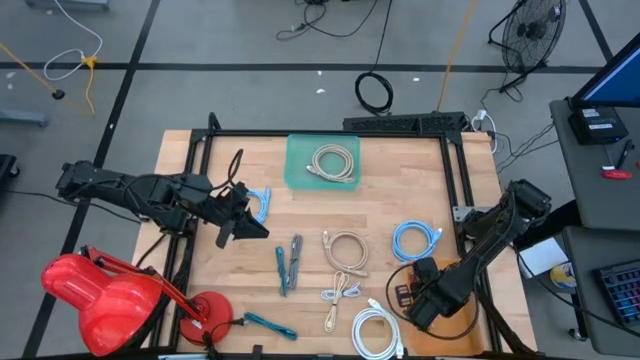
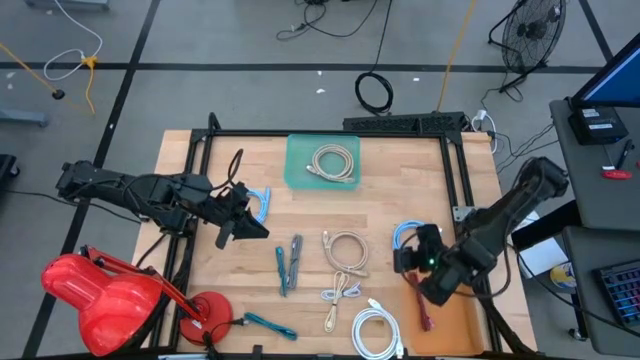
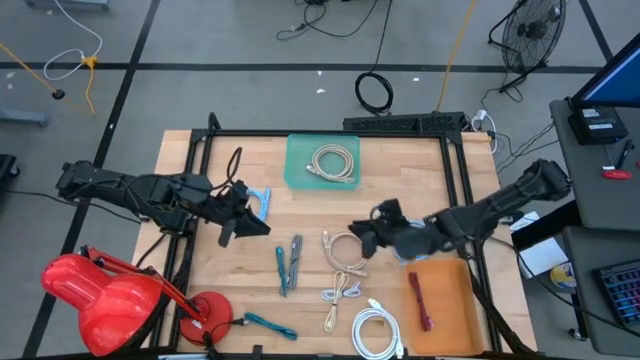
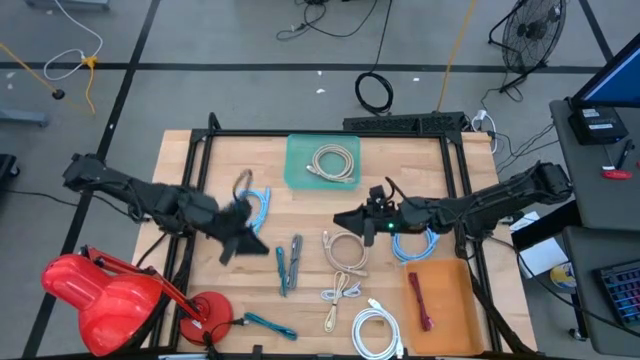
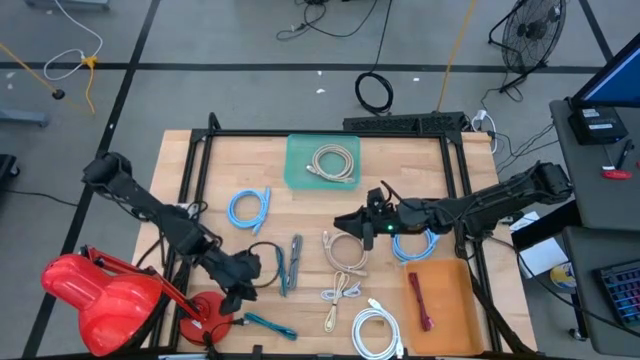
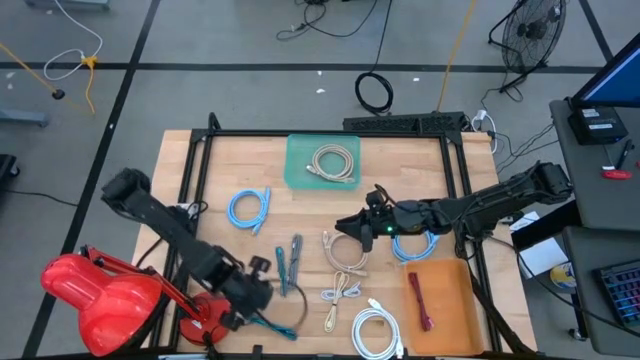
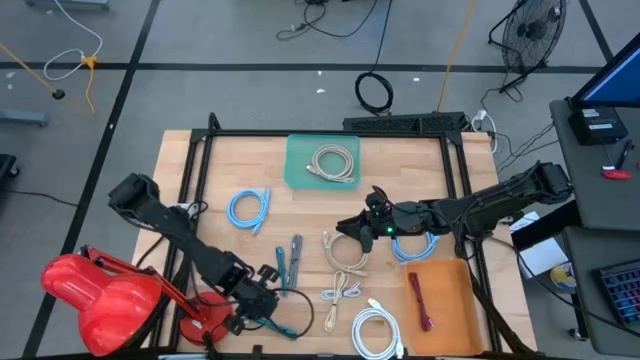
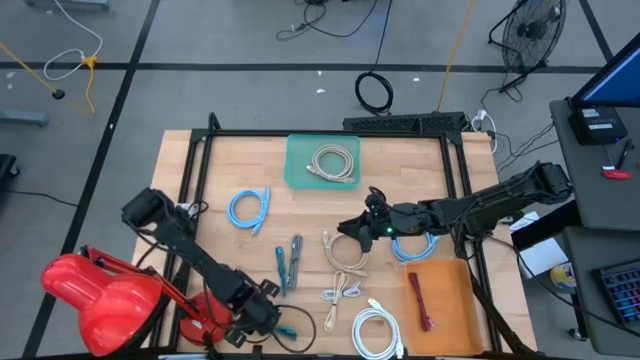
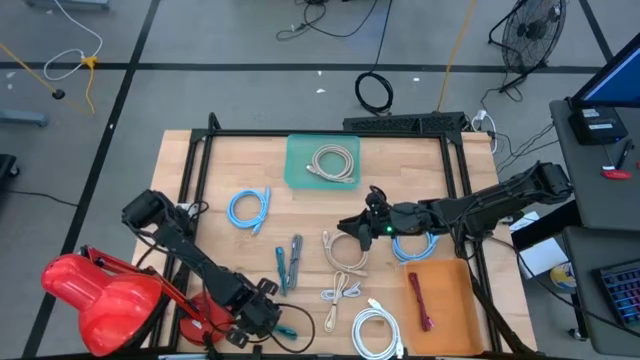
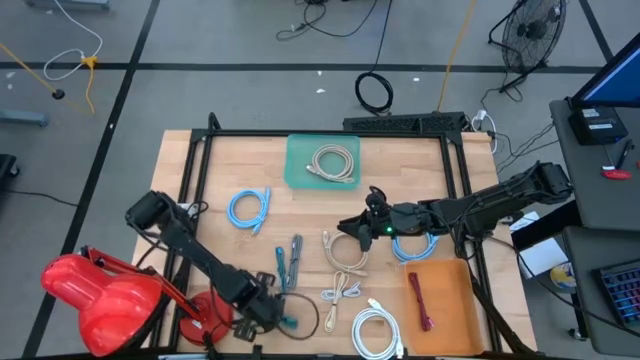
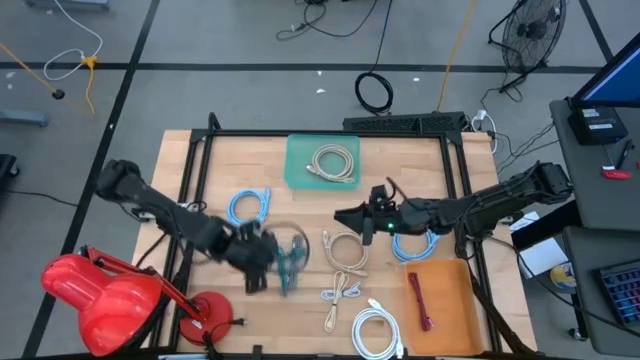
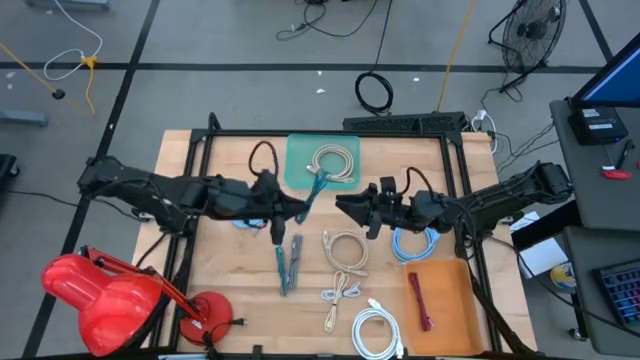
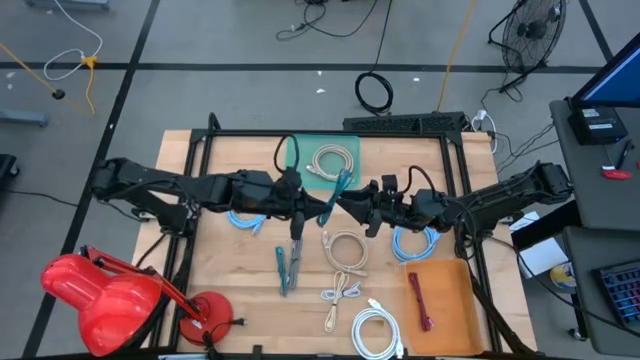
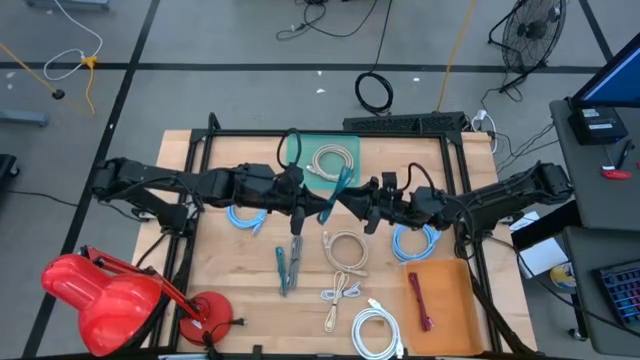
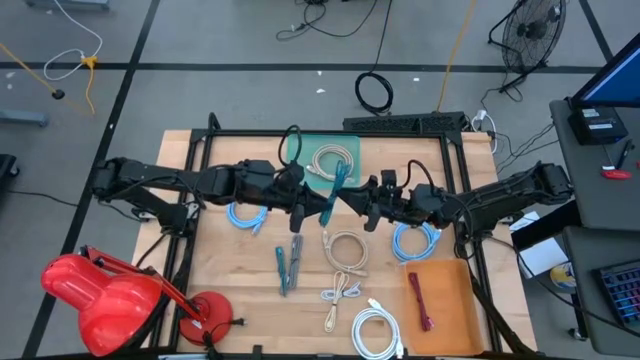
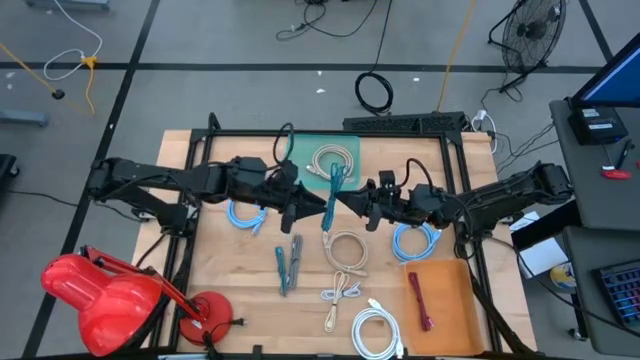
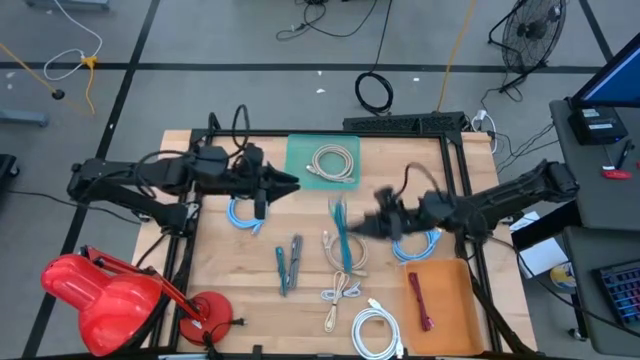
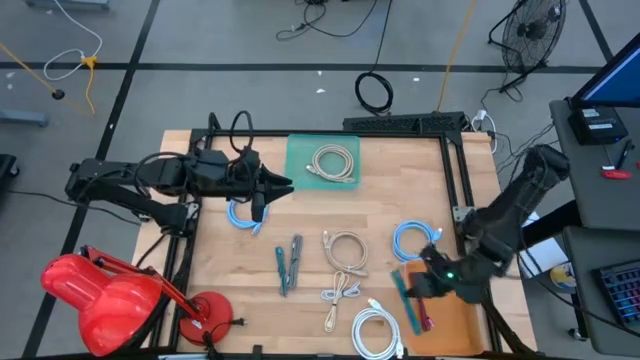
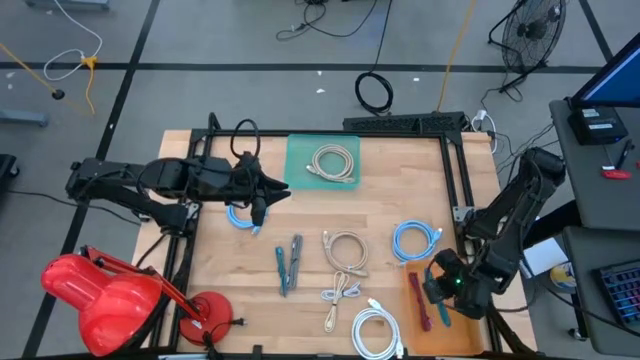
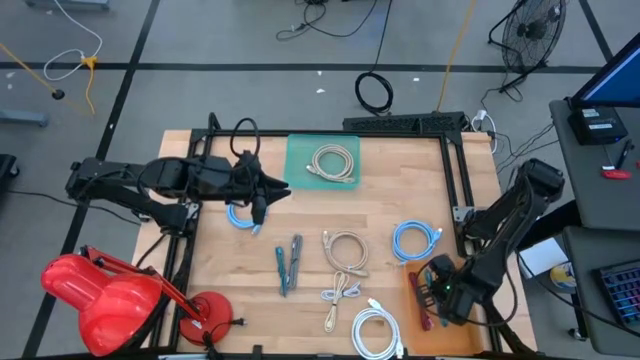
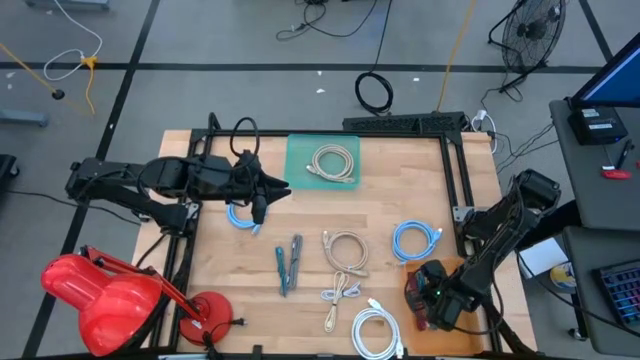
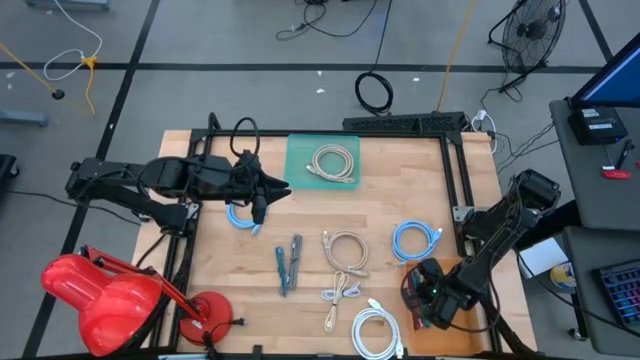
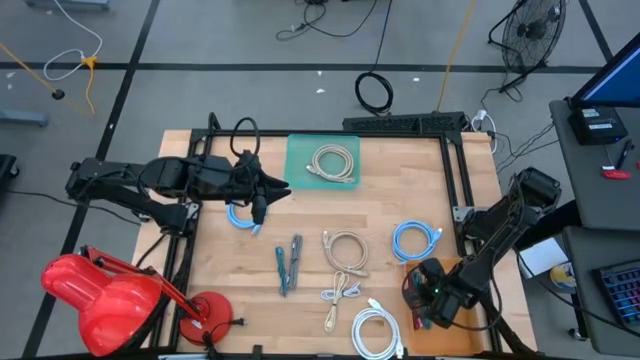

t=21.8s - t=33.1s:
Task: Pick & Place USB Port
Put the bottom blue charger cable into the orange bin

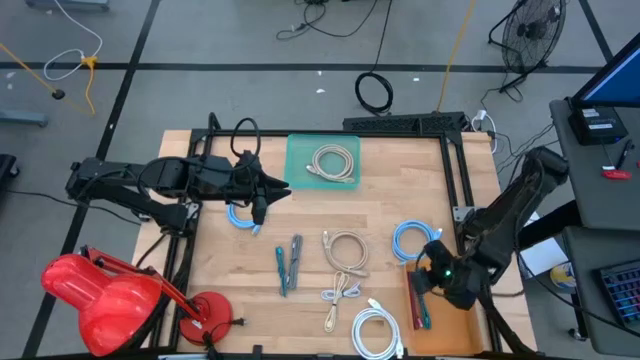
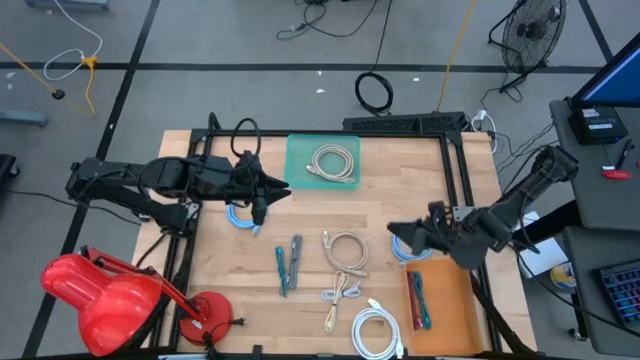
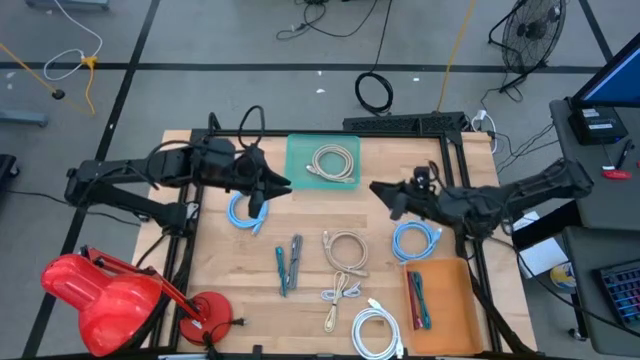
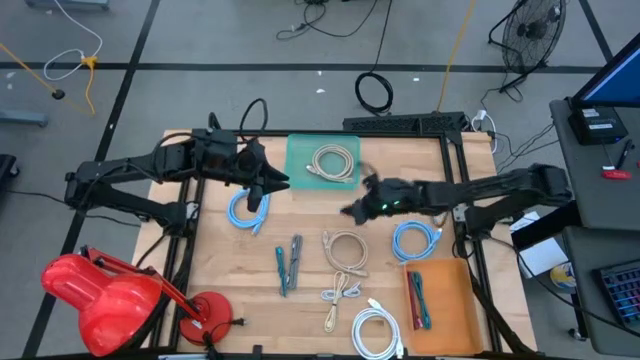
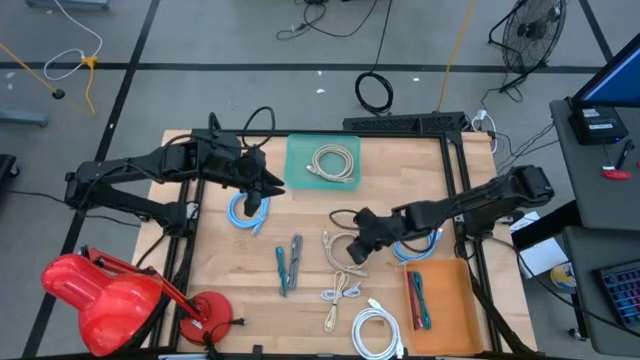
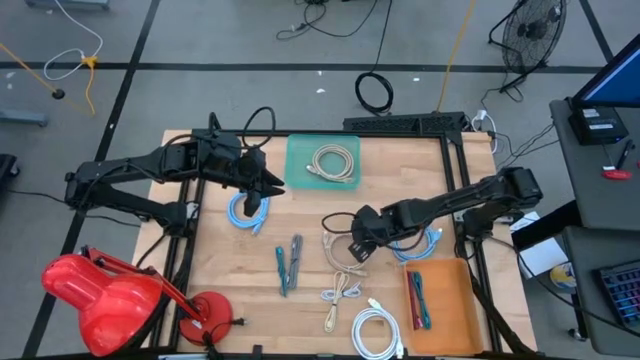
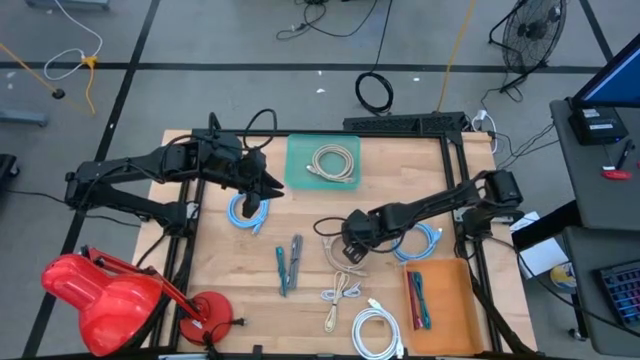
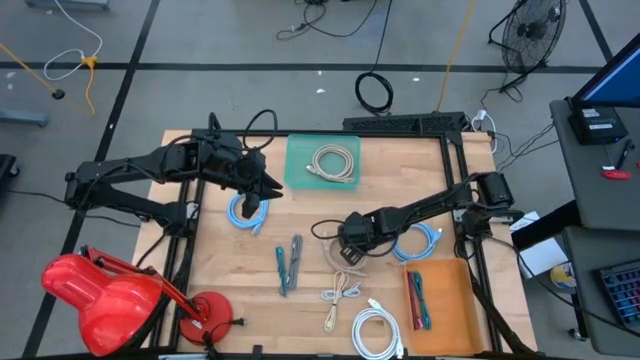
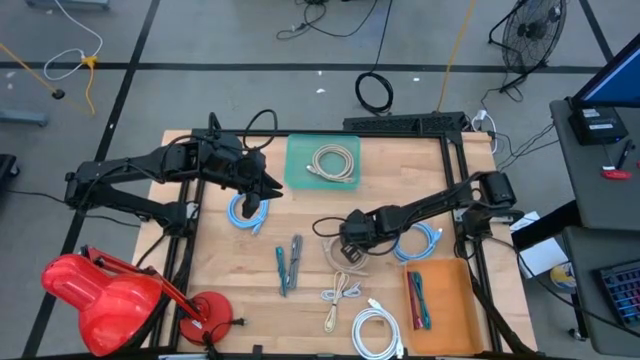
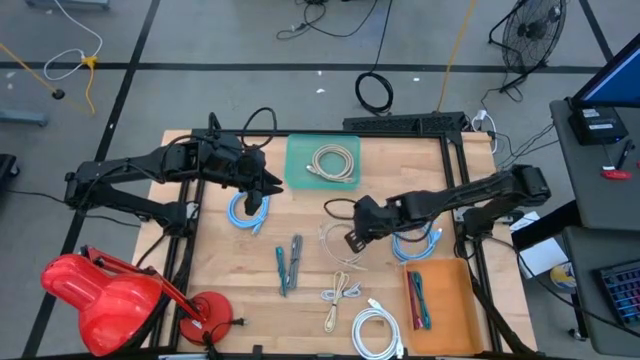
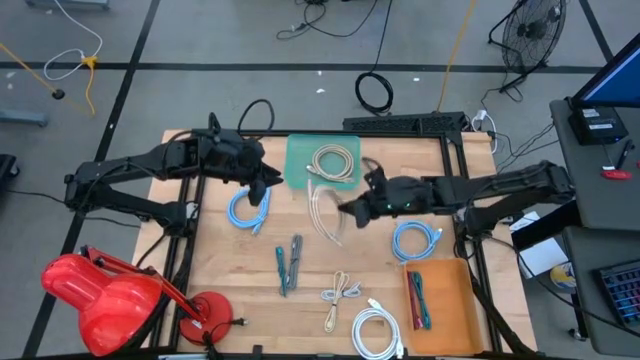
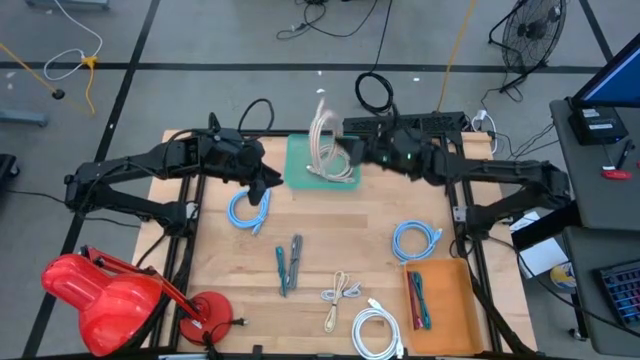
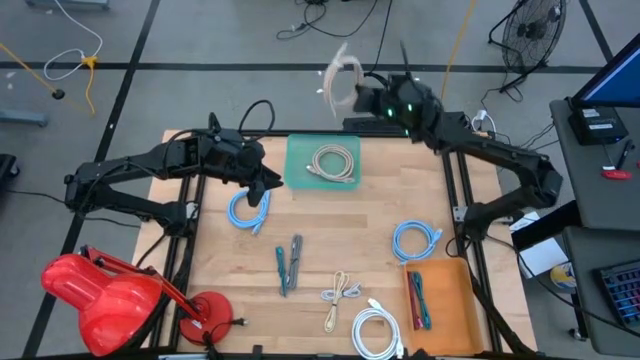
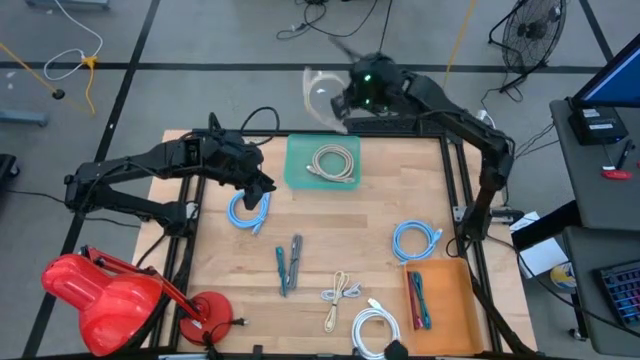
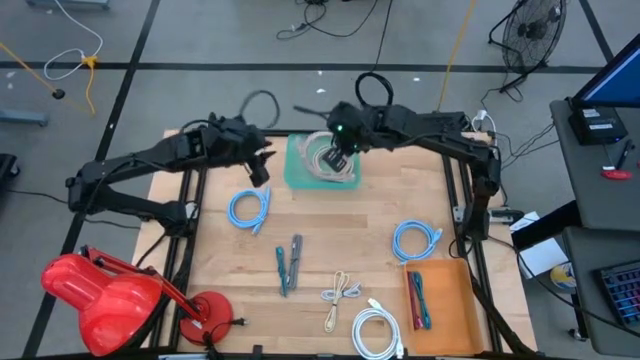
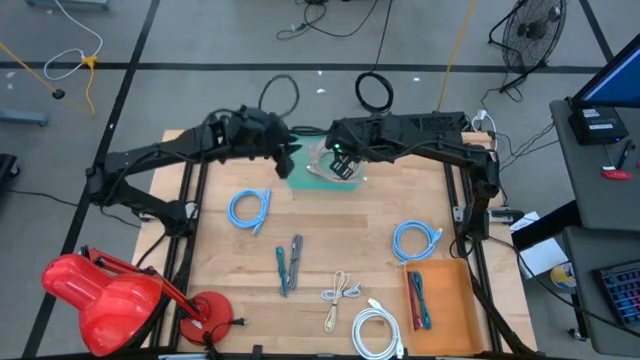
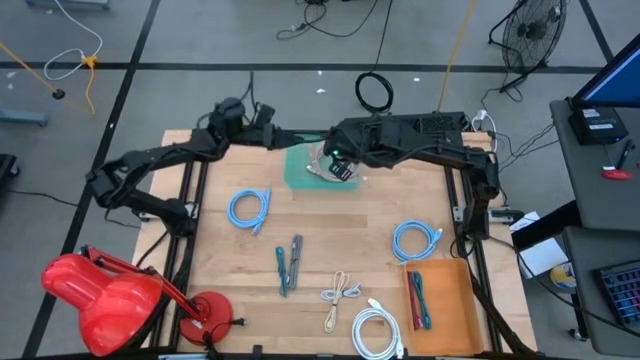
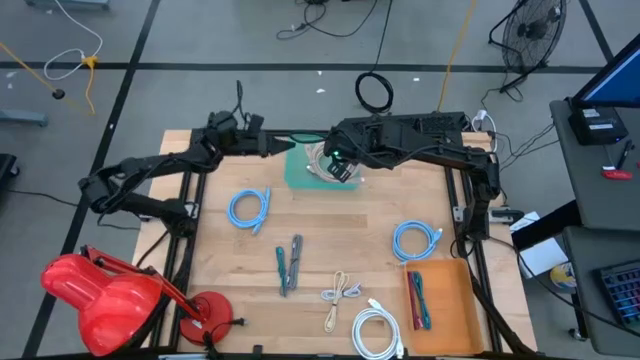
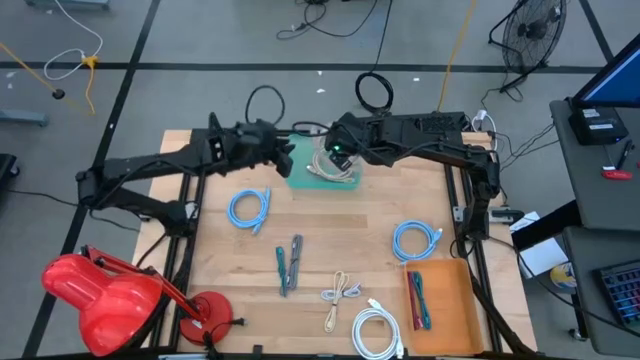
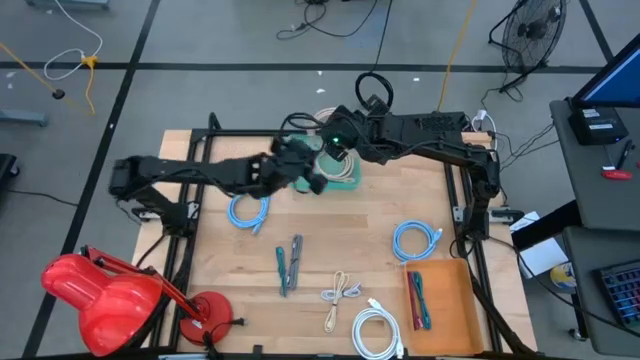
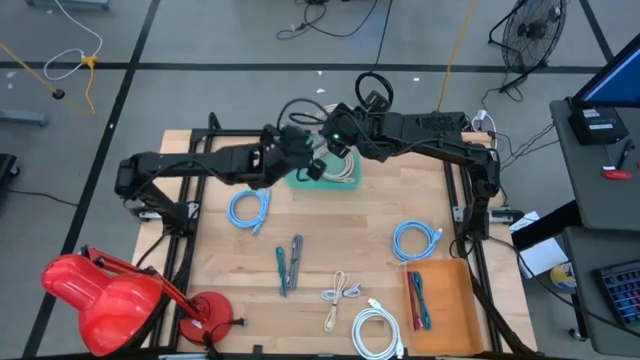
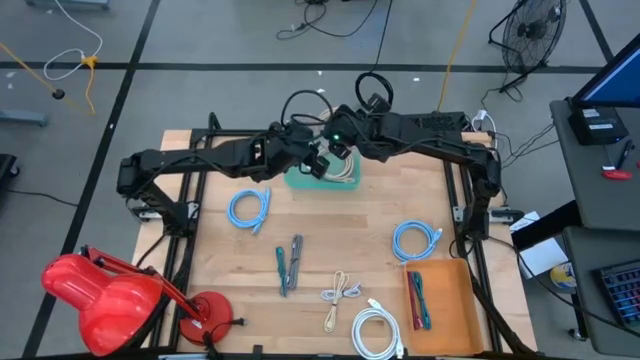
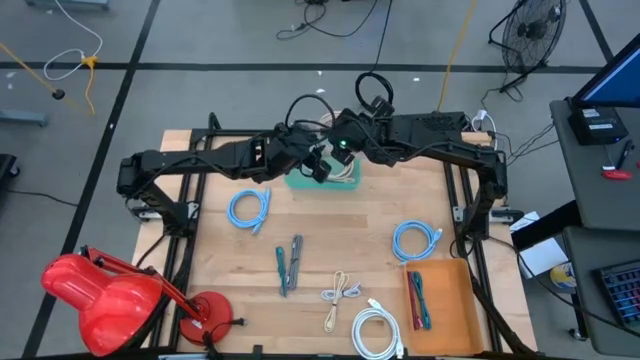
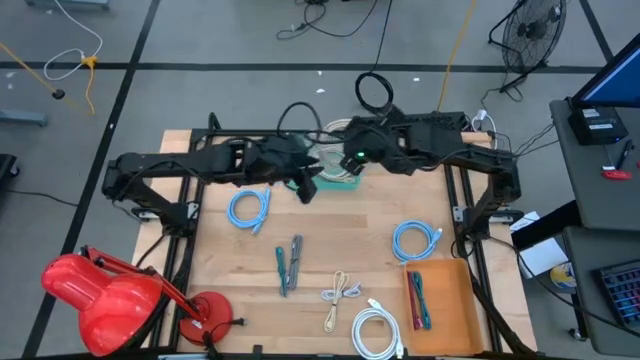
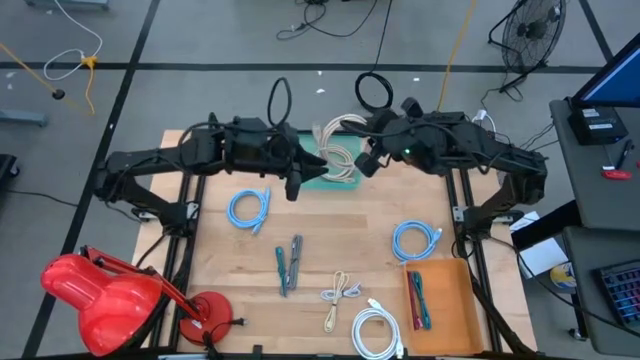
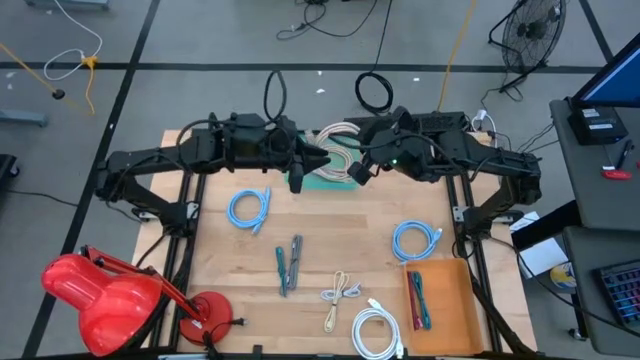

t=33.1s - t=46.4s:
Put the brown display cable into the blue bin
